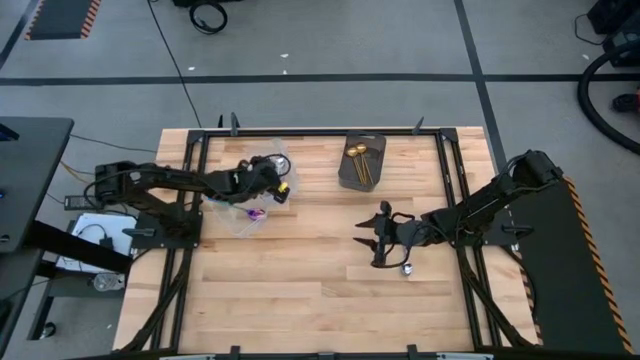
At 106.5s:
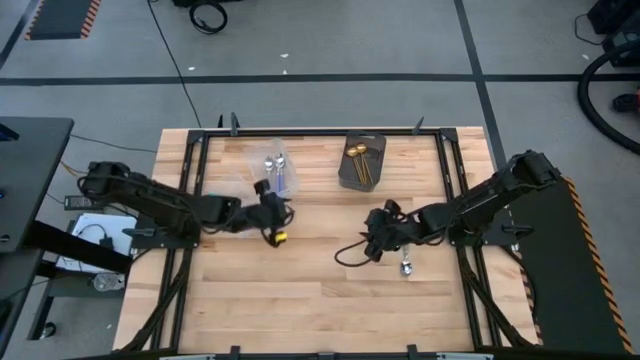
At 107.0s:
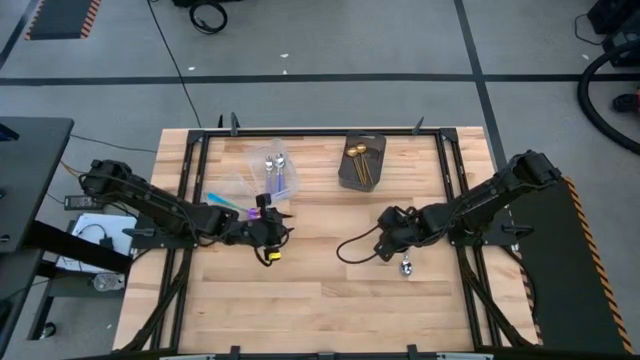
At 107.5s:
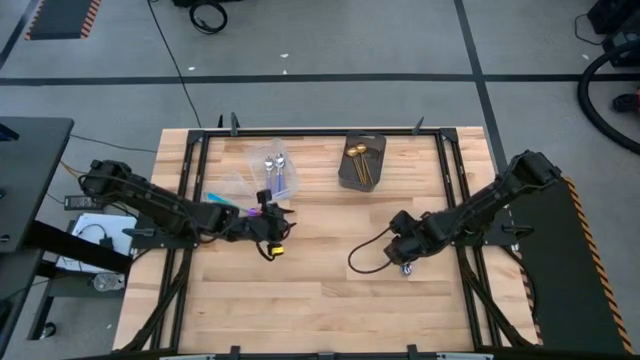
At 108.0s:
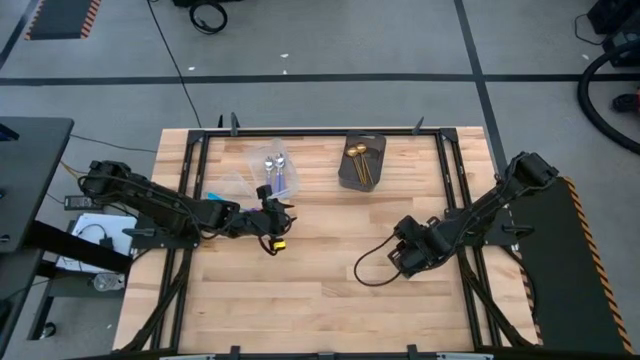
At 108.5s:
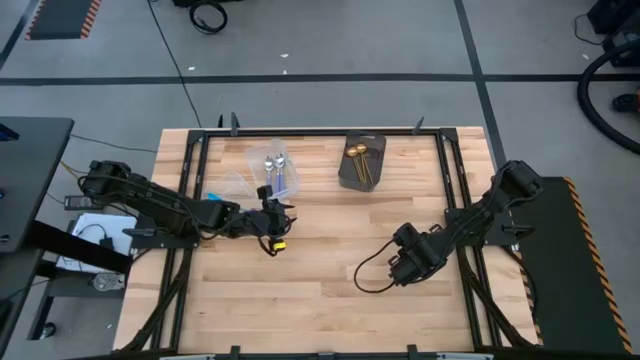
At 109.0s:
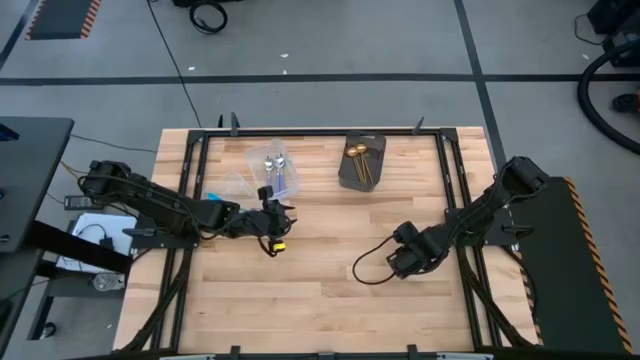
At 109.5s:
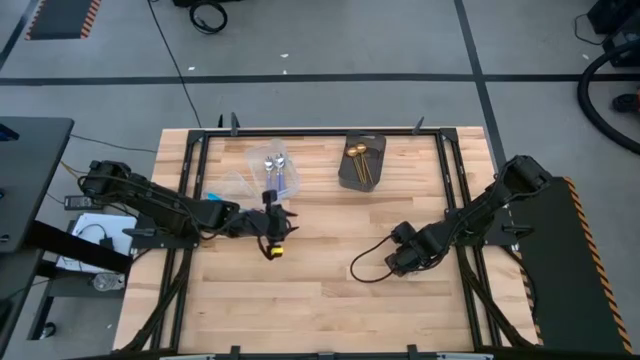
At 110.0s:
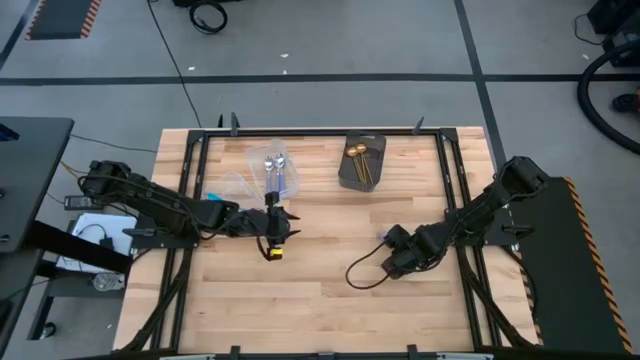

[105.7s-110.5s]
Task: Sort silverware by color (type)
Put the purple spoon into the right transparent bin

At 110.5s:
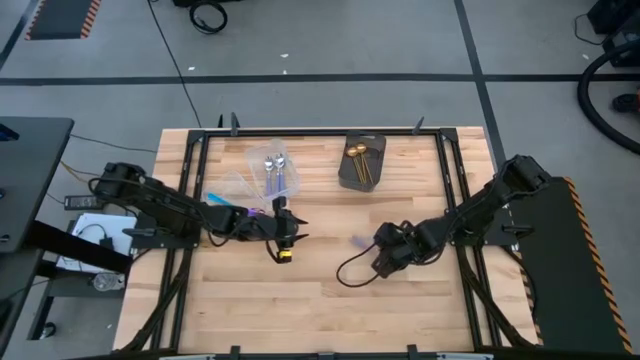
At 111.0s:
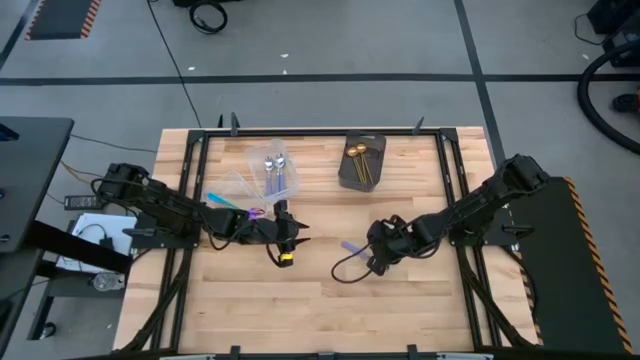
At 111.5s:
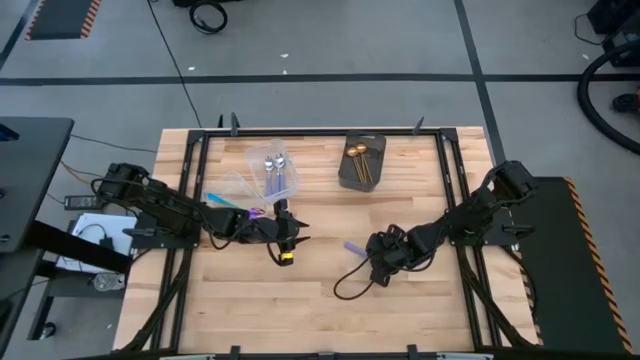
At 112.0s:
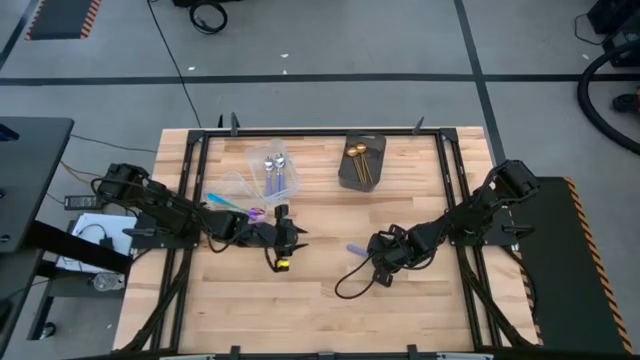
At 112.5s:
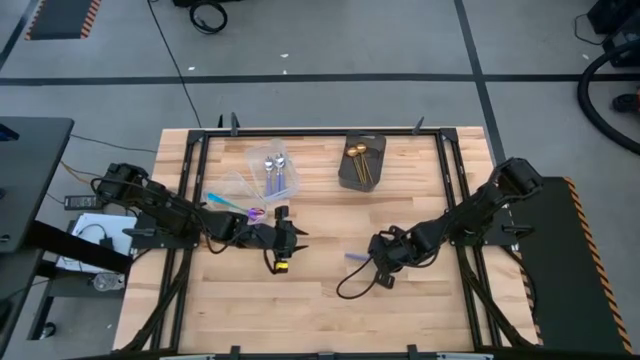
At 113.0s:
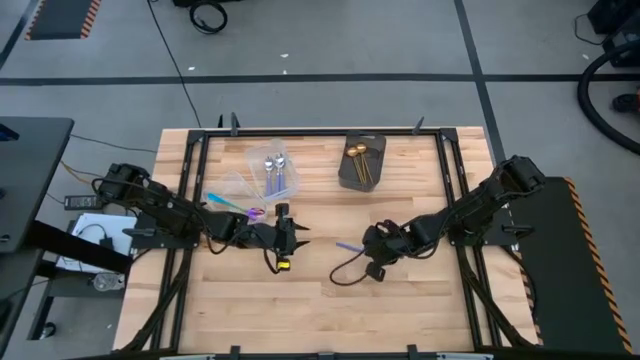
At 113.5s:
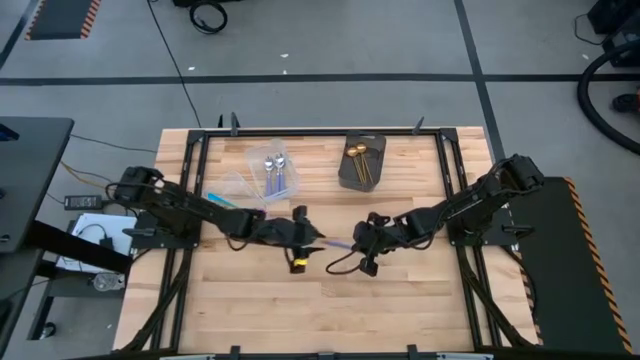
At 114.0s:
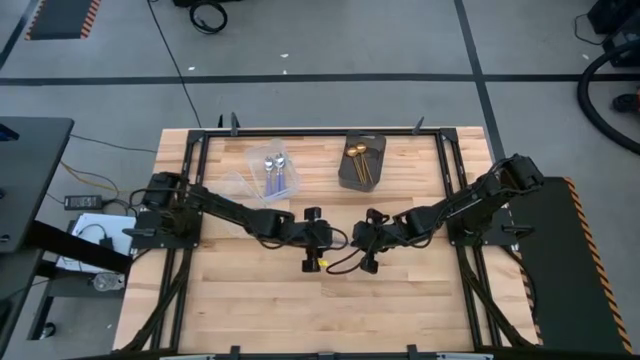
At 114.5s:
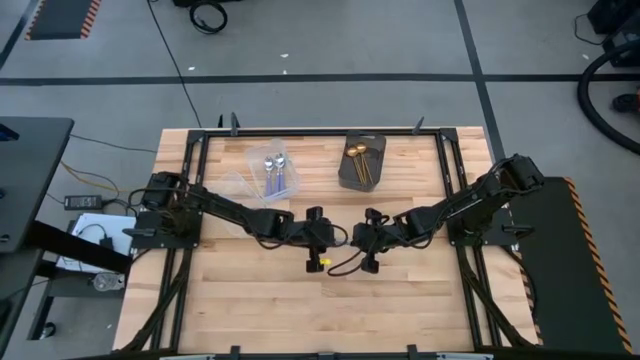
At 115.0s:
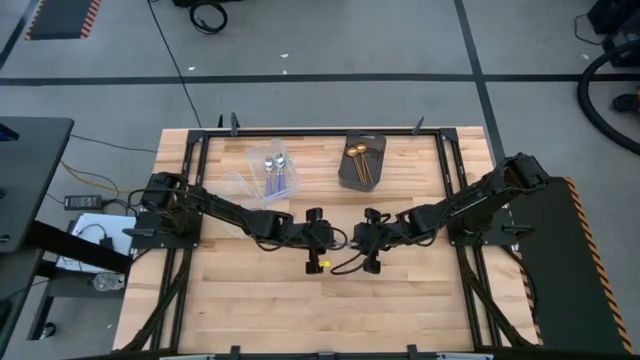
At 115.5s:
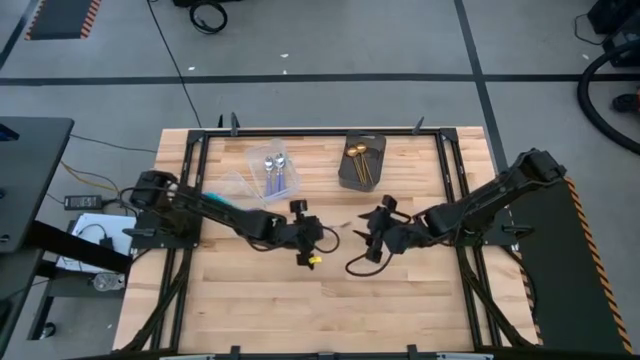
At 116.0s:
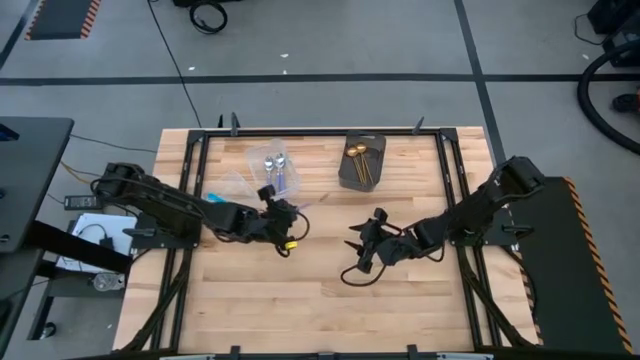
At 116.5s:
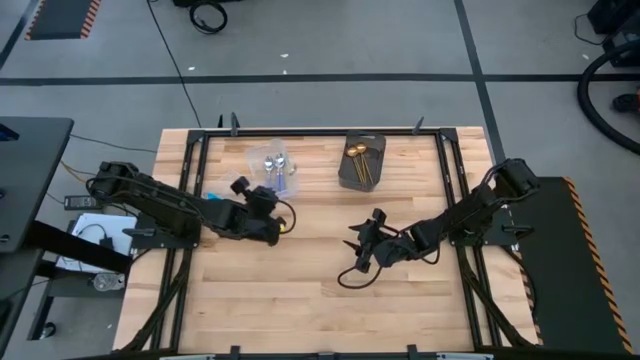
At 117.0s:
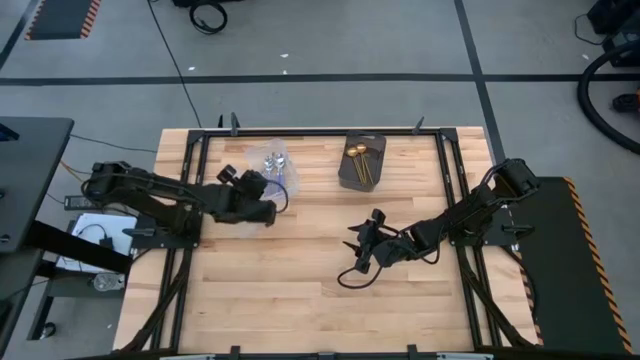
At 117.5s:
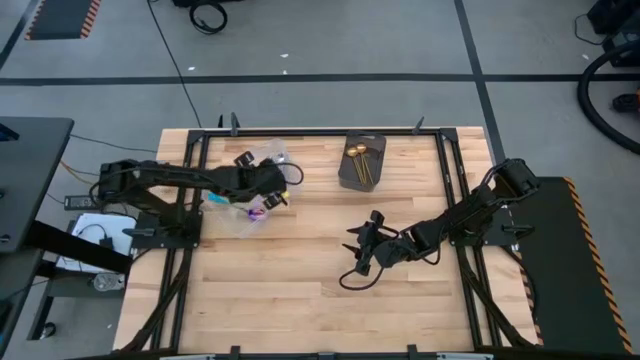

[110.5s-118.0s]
Put the purple spoon into the right transparent bin

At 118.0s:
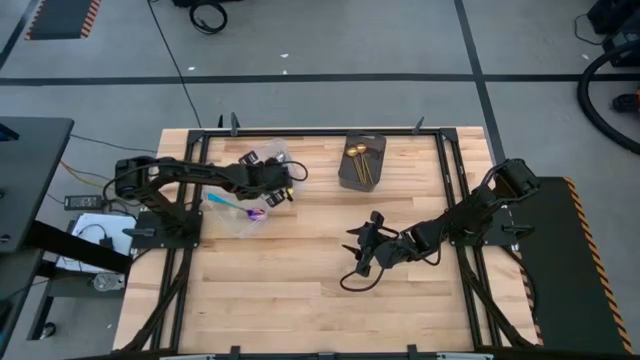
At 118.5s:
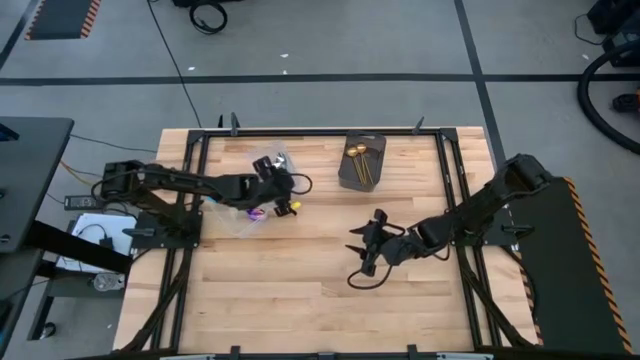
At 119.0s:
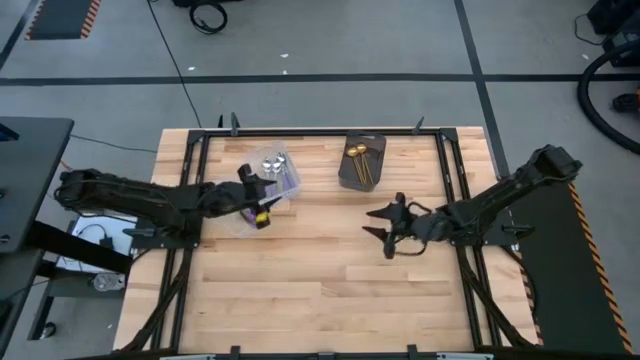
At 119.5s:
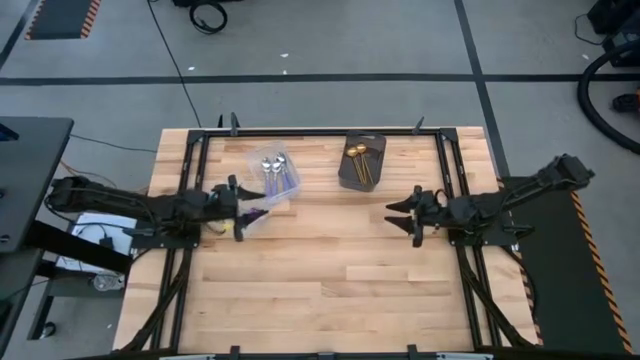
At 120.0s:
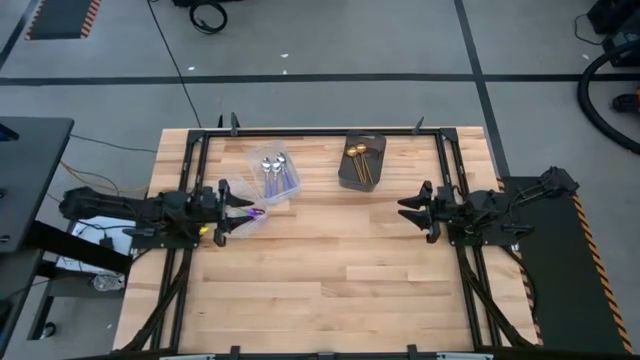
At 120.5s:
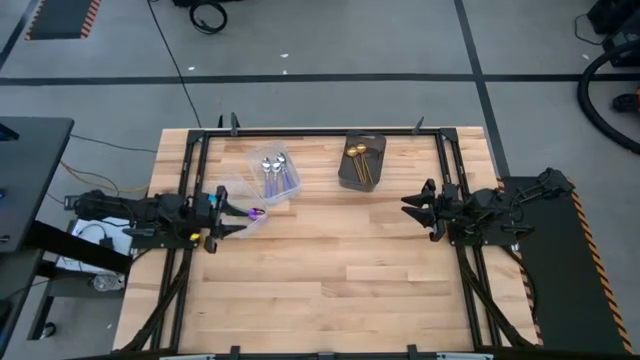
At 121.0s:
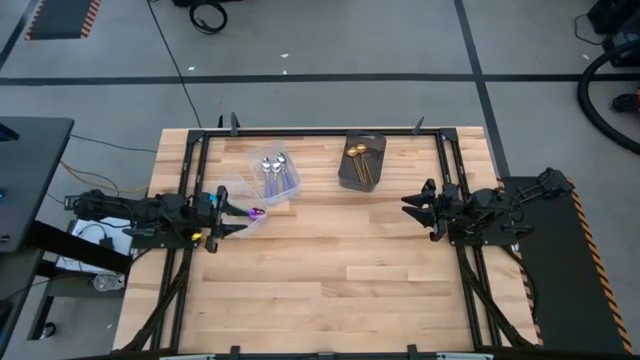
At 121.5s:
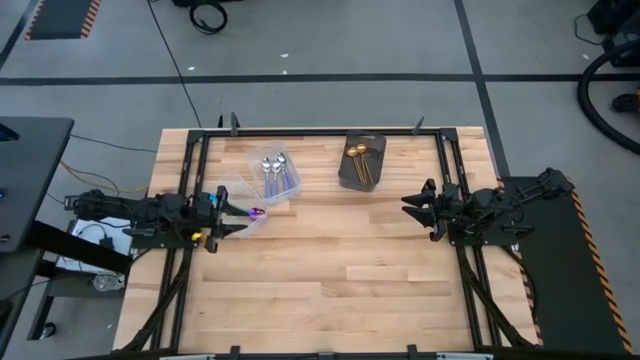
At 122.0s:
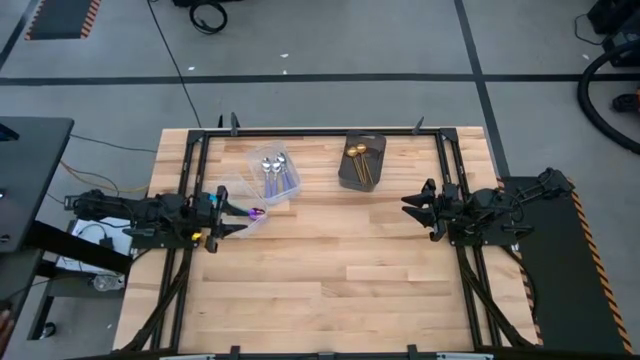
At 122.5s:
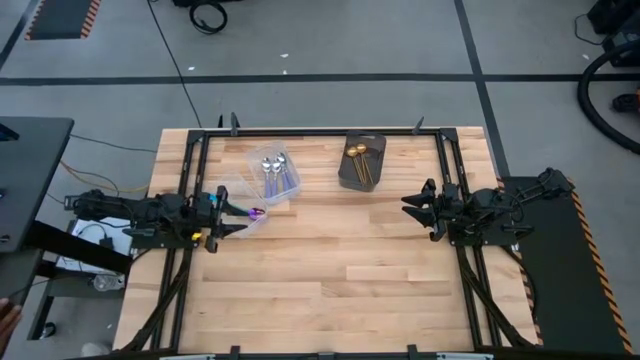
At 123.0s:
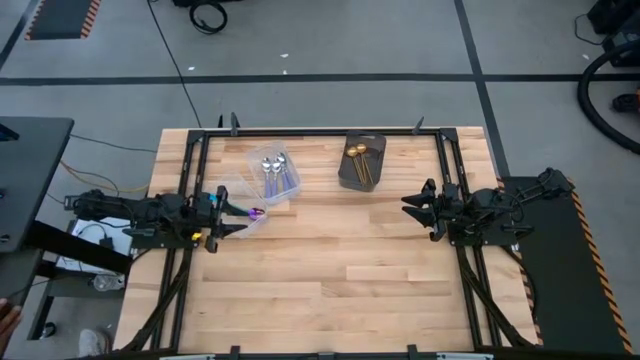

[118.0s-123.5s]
Return to Home Position

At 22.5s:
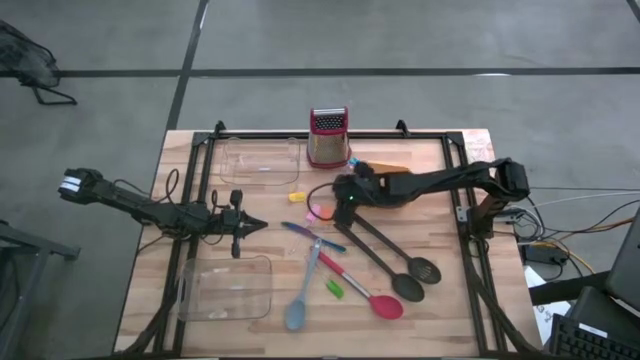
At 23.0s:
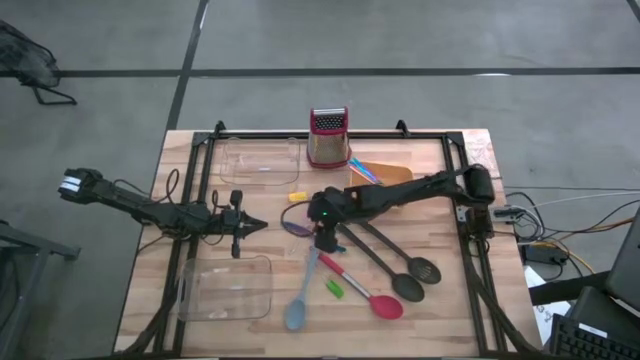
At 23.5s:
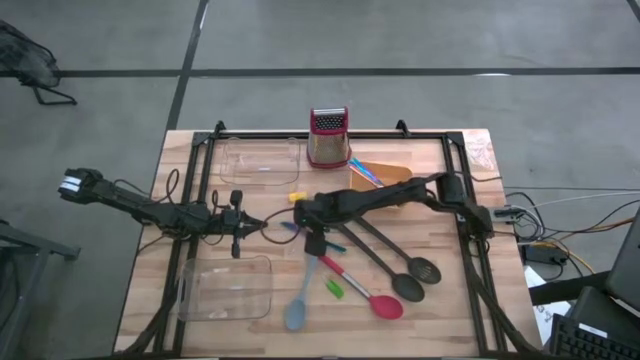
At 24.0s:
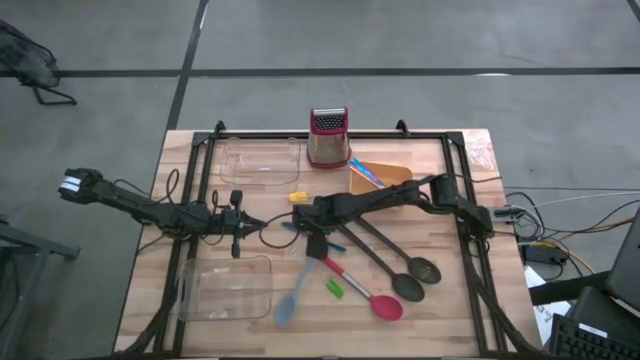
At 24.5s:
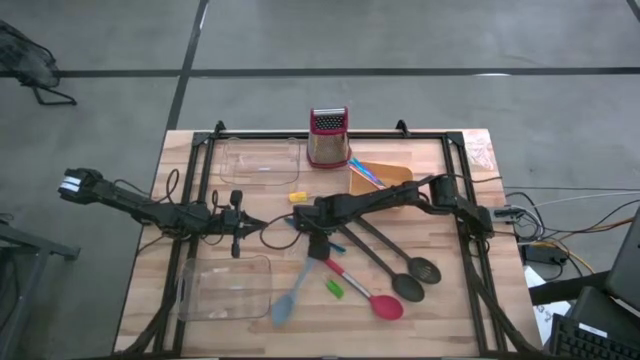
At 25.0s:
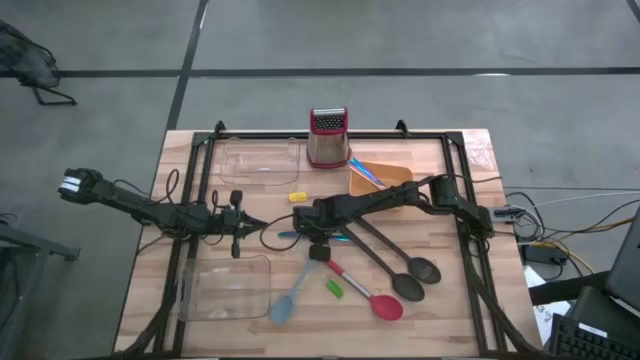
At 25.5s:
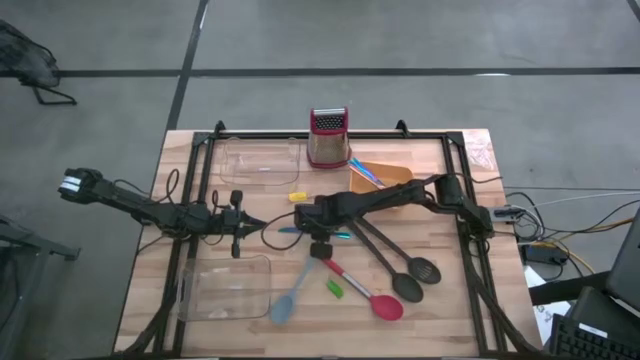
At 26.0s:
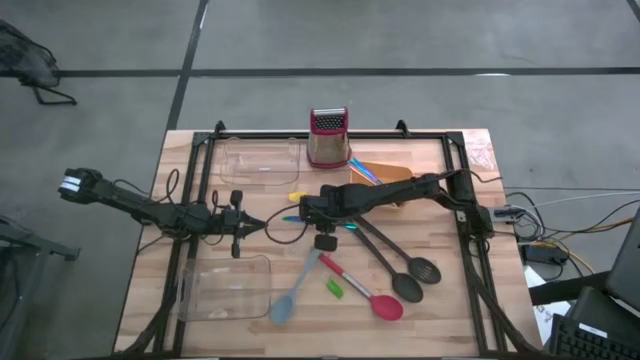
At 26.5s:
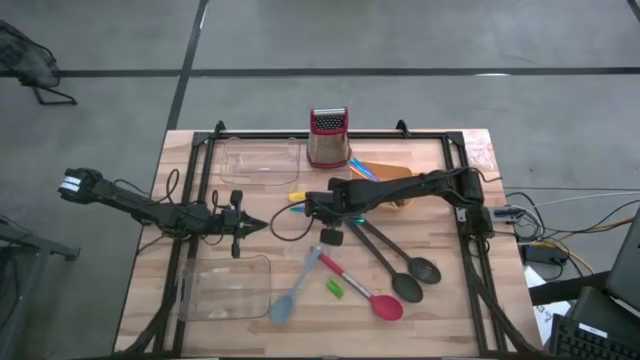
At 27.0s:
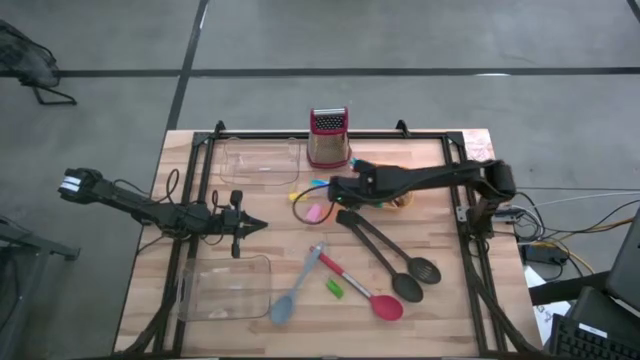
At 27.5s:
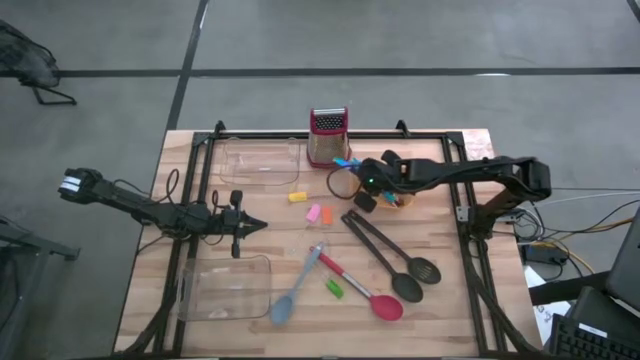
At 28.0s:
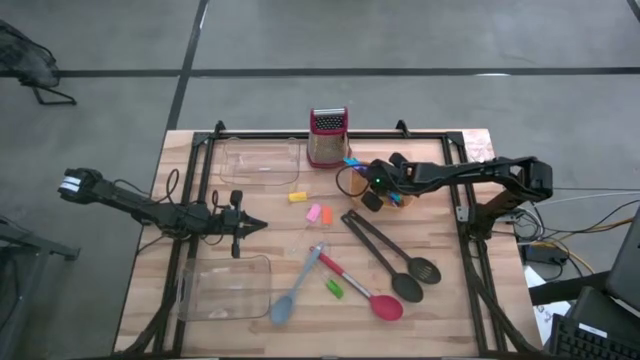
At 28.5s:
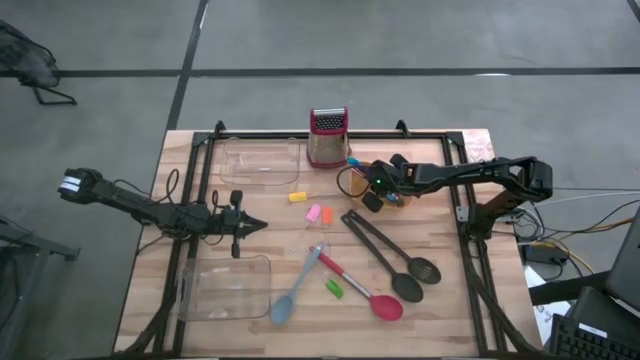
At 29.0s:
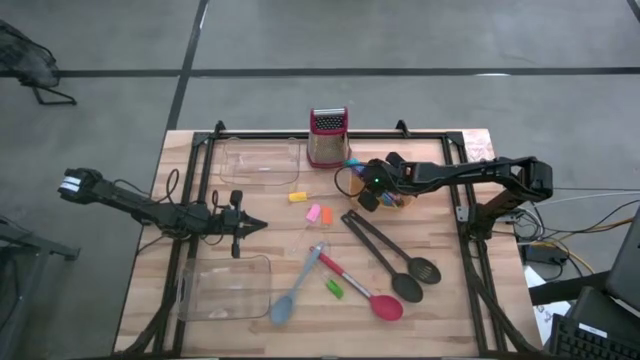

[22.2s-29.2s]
Task: Pick & Place Kitchen Items
Put the blue purple knife into the yellow bin
